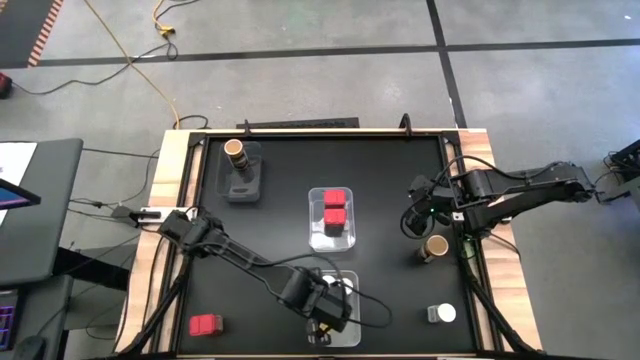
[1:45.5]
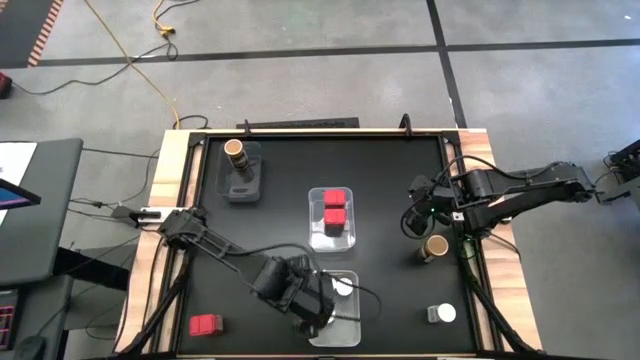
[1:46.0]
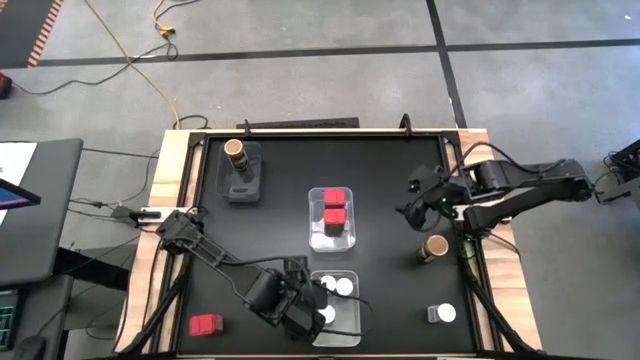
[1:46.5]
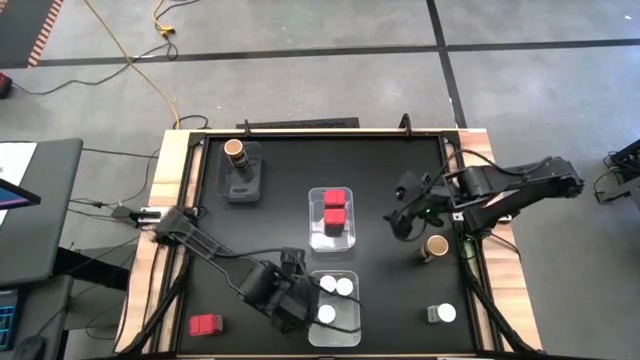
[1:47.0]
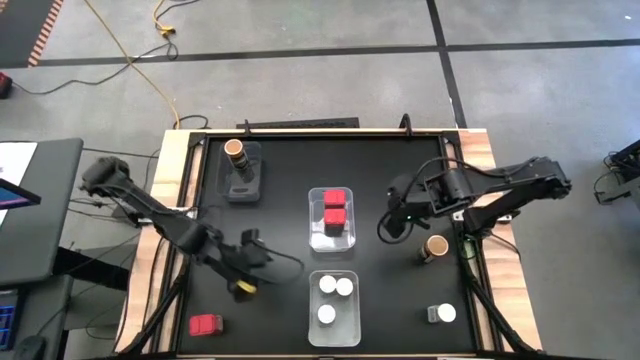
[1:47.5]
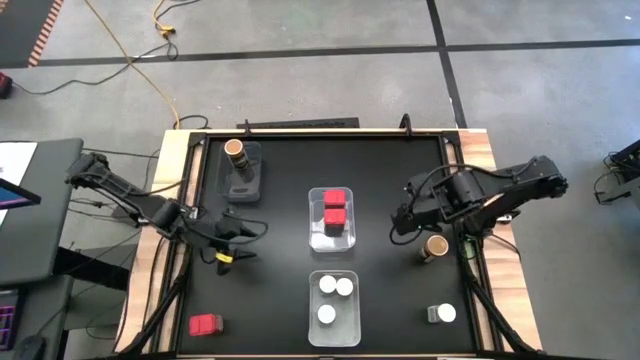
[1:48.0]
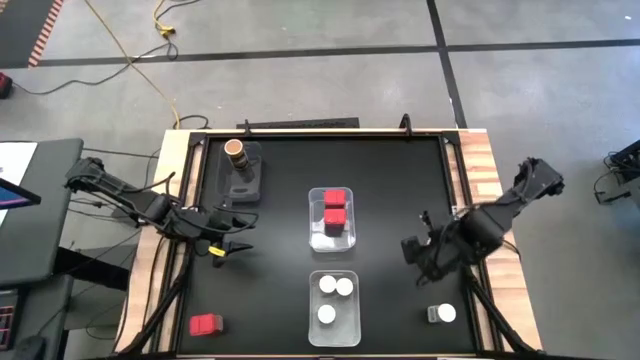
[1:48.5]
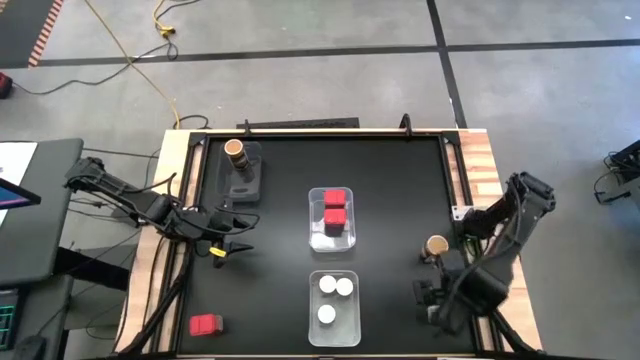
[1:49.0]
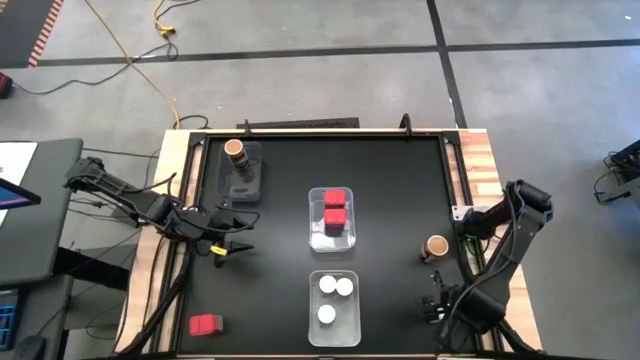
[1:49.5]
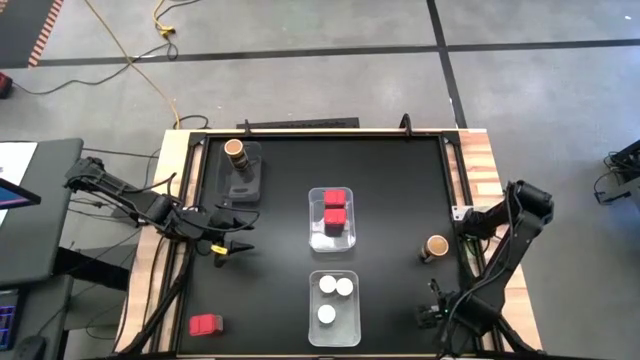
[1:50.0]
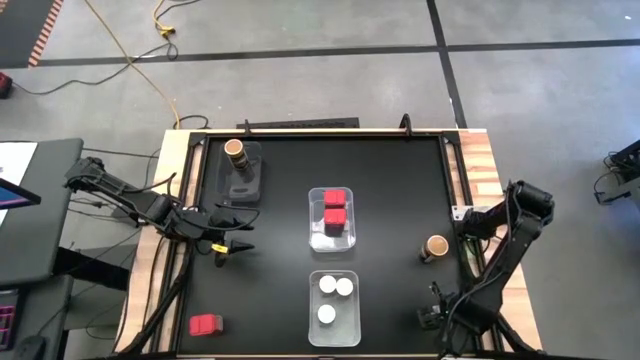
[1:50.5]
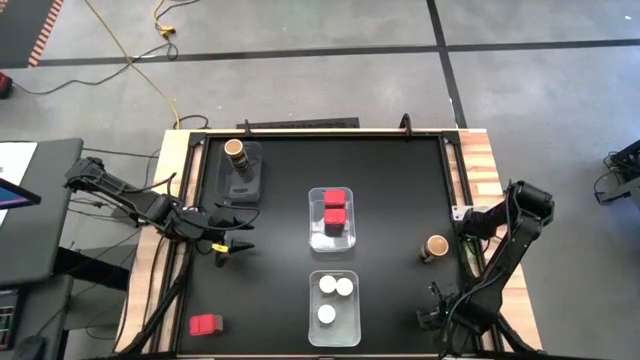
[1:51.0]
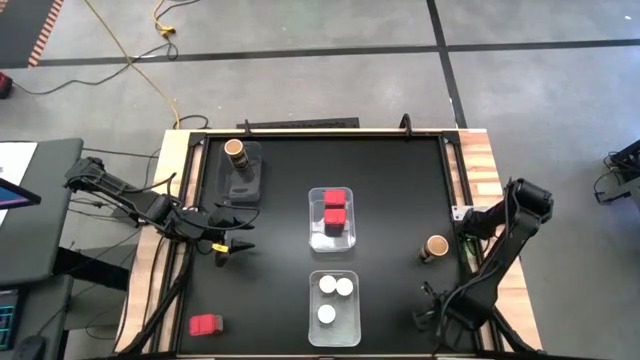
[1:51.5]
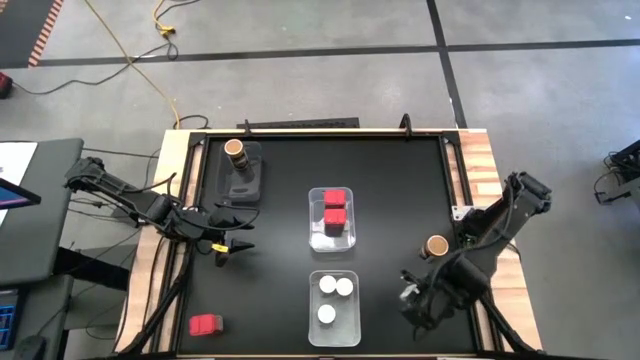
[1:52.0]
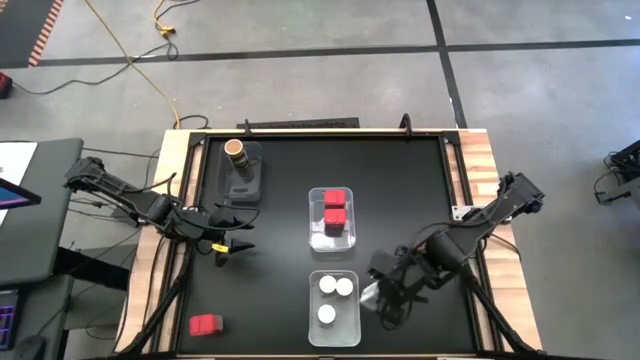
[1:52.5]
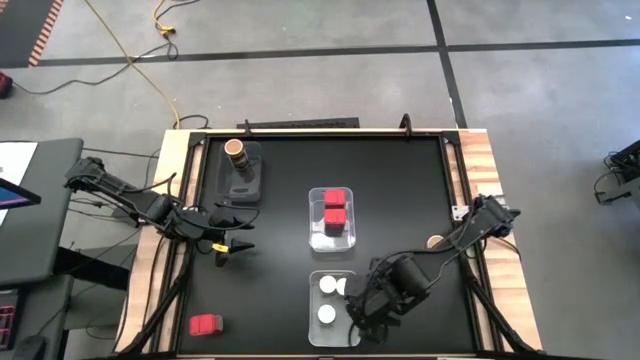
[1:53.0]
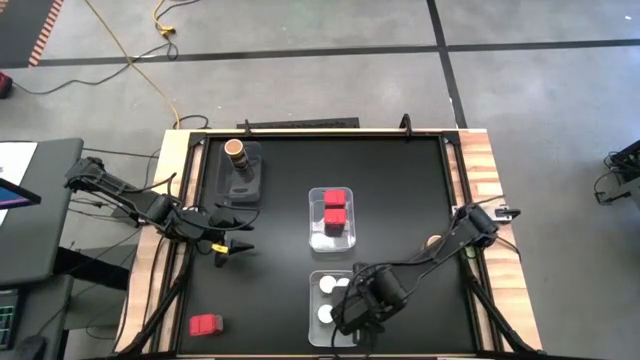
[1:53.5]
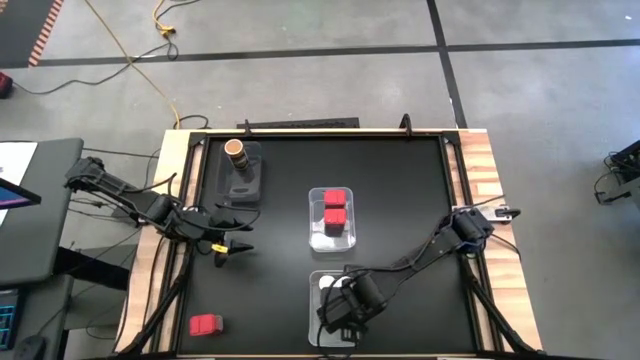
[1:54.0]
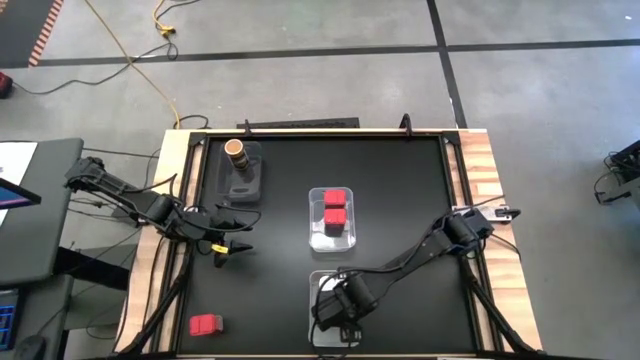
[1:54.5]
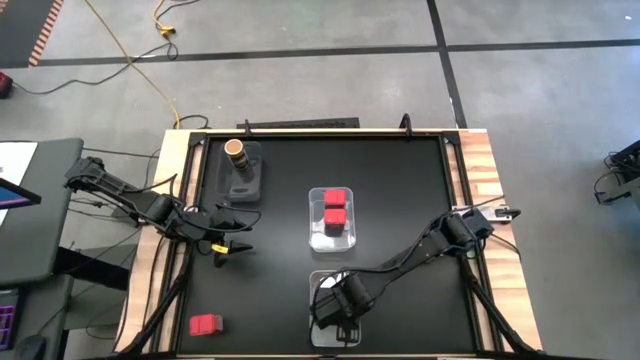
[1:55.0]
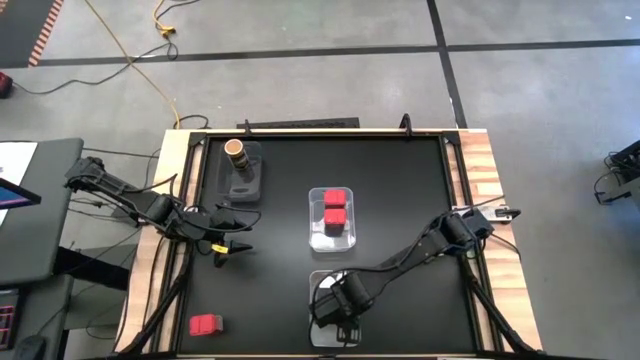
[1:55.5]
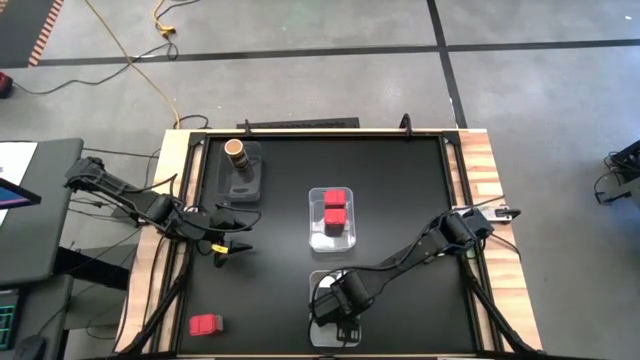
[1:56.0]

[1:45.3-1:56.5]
Task: Sort spices by type
Put the white seasoning bottle into the white bin

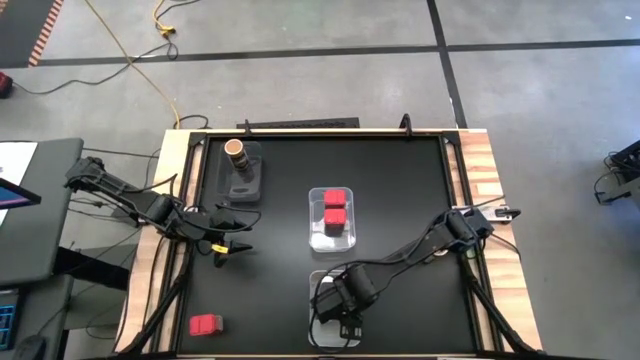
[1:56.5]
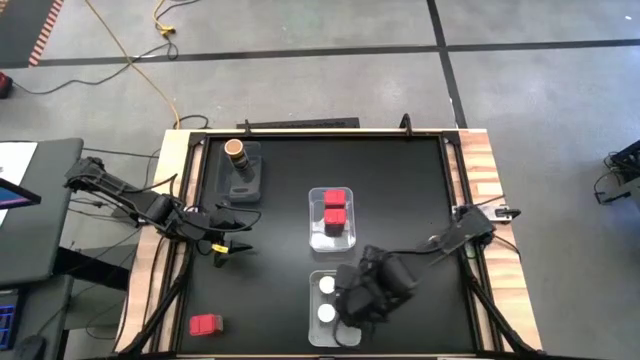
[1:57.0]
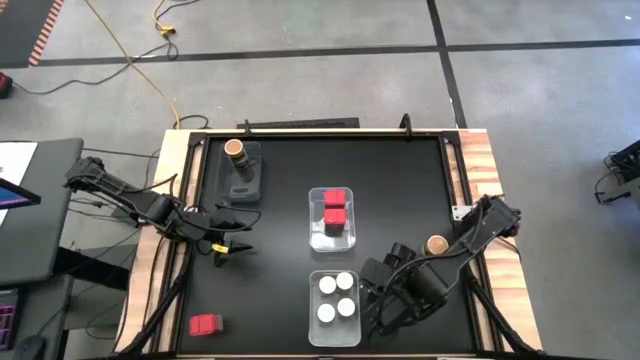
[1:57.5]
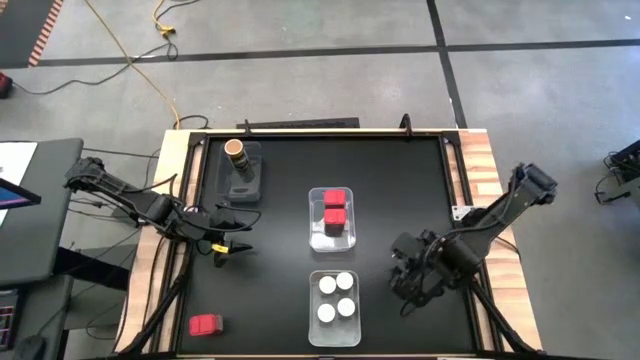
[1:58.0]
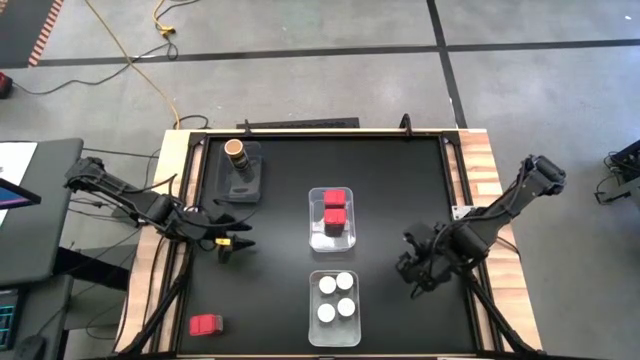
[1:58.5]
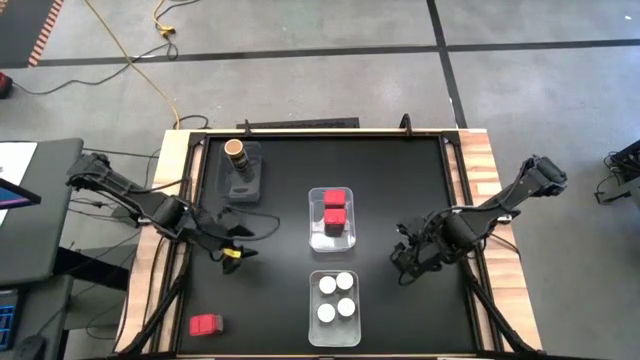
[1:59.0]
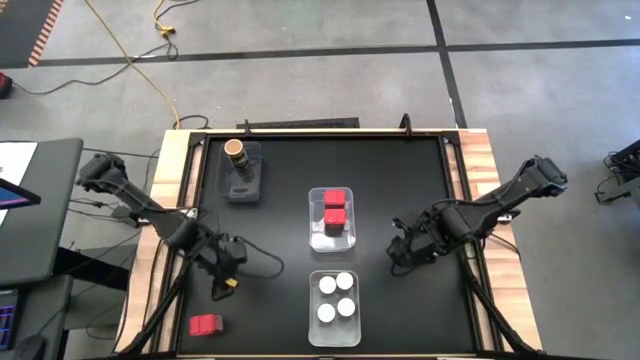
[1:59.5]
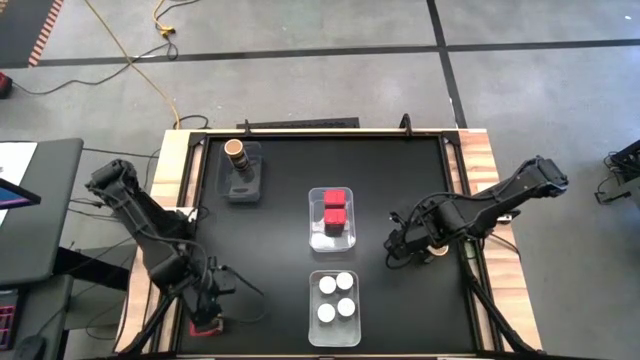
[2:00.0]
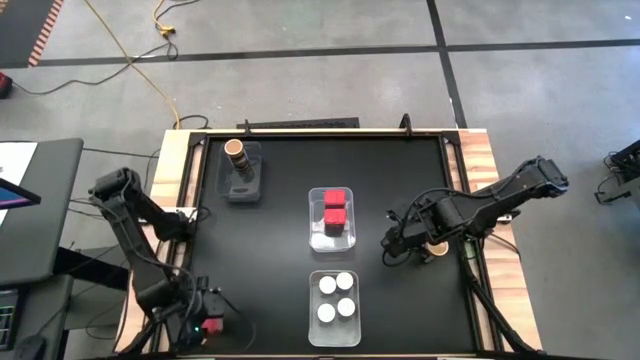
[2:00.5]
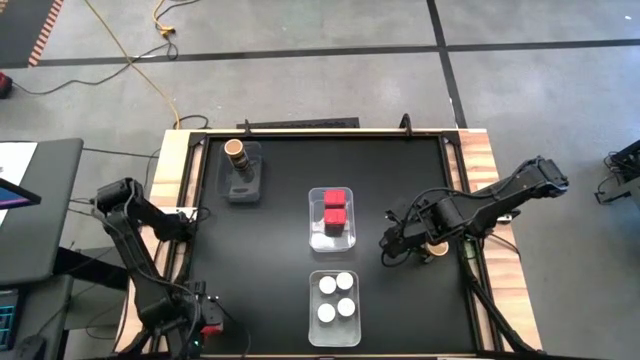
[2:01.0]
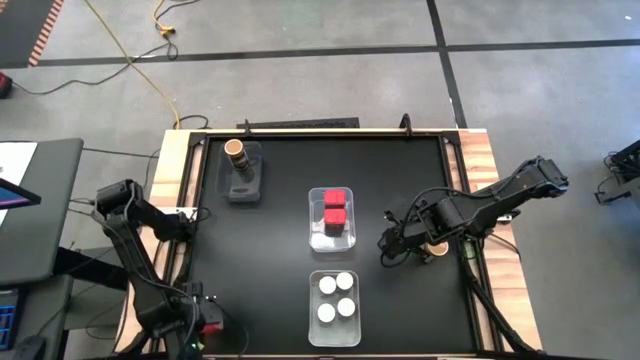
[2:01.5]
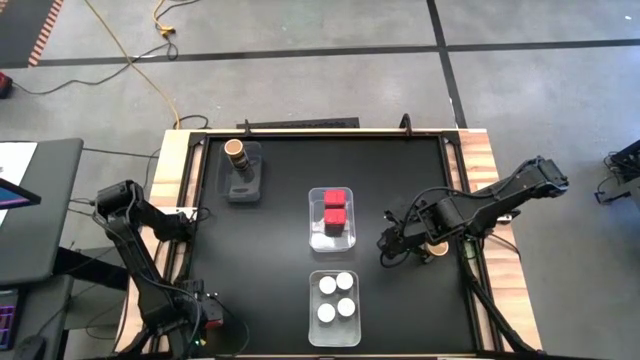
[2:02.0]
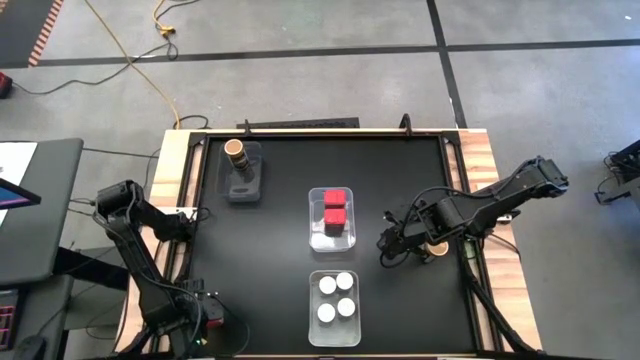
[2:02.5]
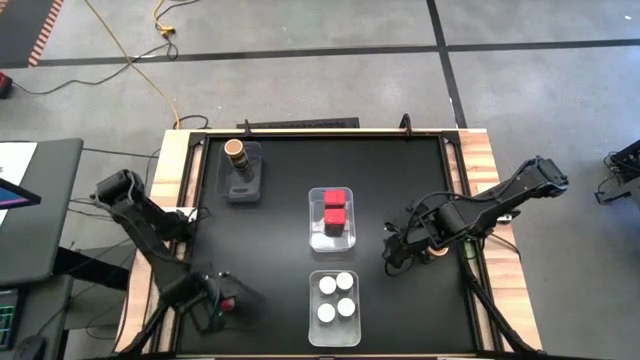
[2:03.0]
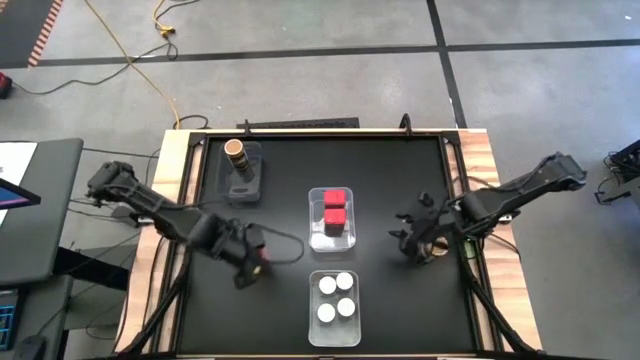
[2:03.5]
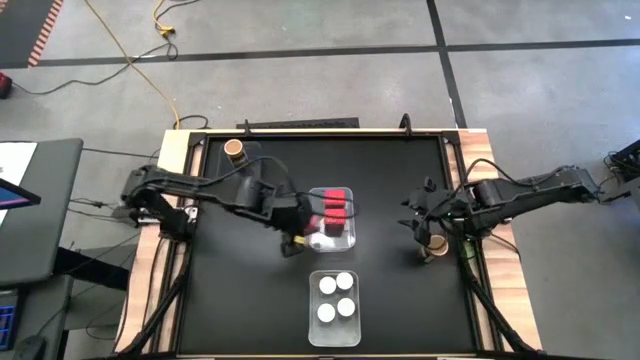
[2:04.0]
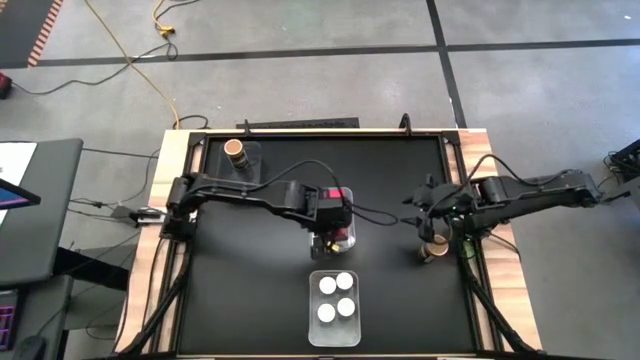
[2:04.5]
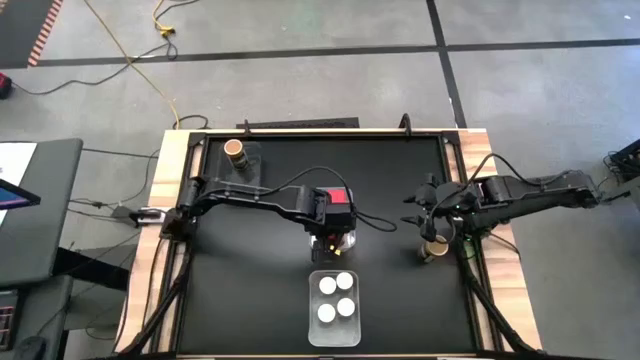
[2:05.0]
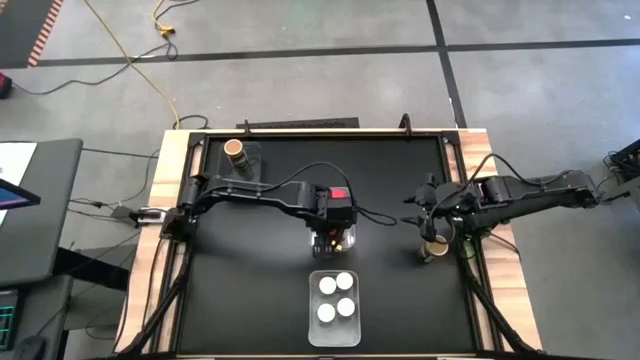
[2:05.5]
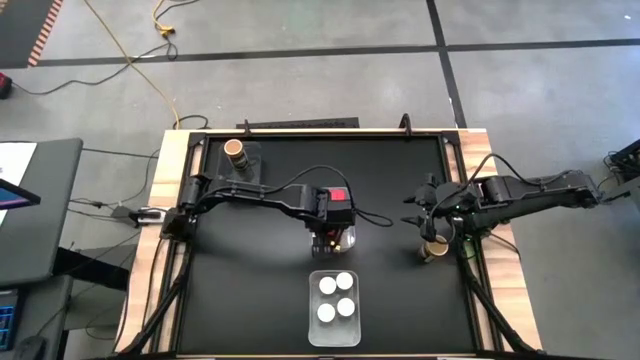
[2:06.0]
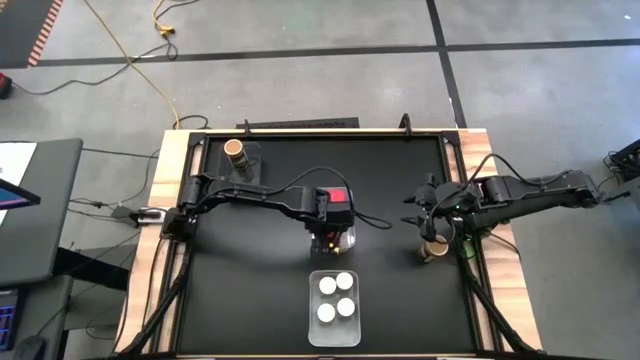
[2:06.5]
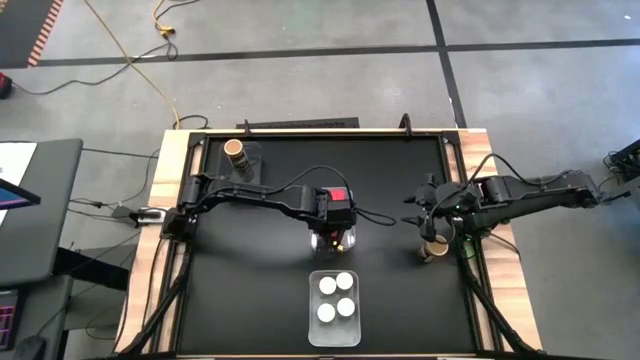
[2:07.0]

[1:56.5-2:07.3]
Put the red seasoning can into the transparent bin
